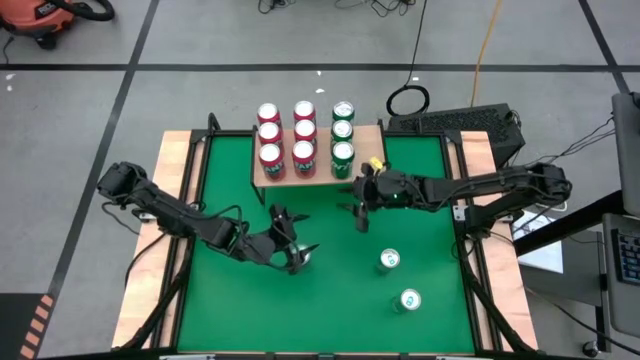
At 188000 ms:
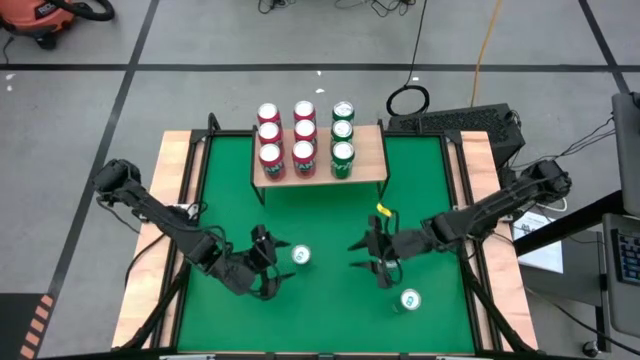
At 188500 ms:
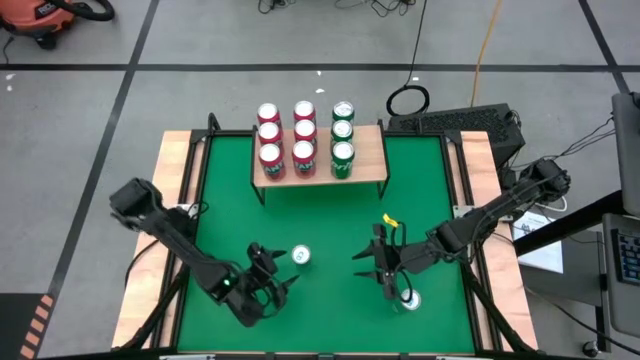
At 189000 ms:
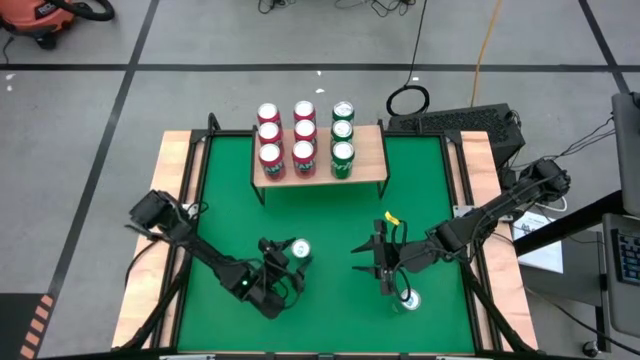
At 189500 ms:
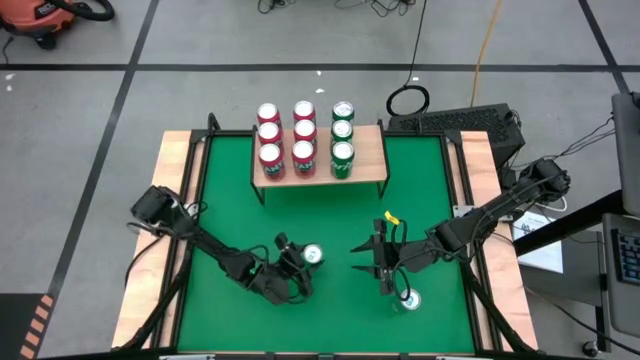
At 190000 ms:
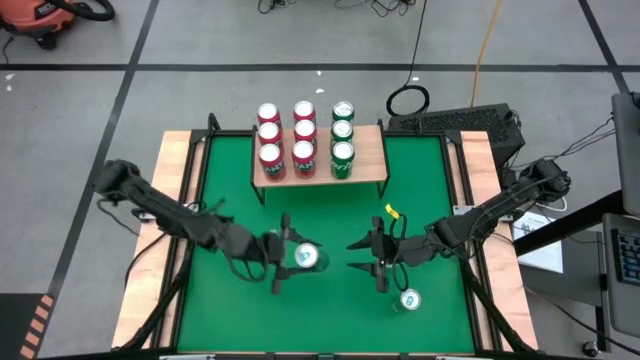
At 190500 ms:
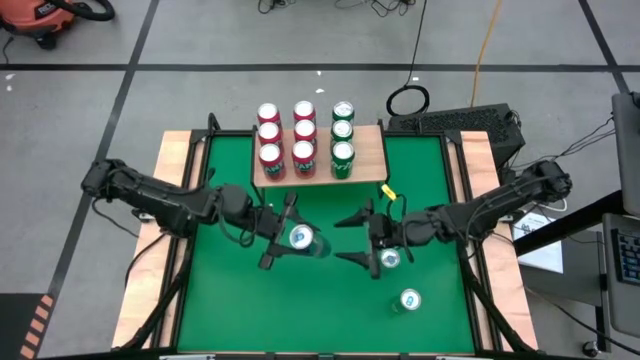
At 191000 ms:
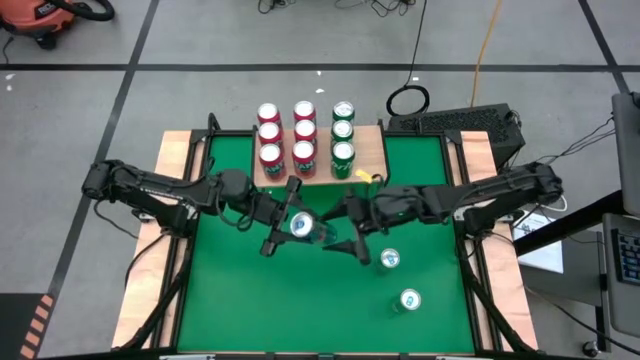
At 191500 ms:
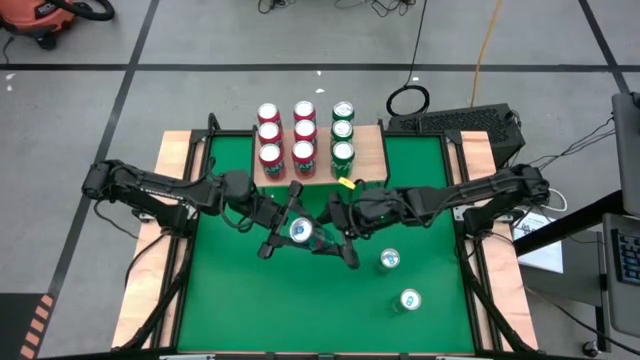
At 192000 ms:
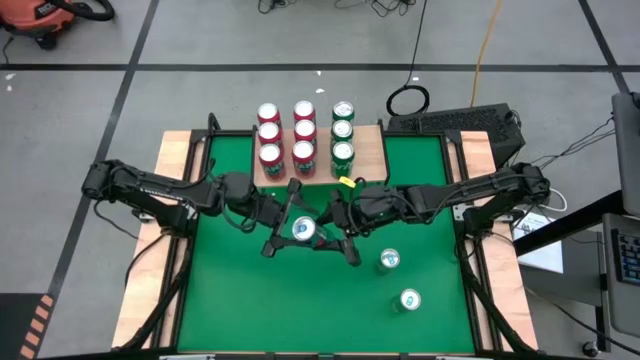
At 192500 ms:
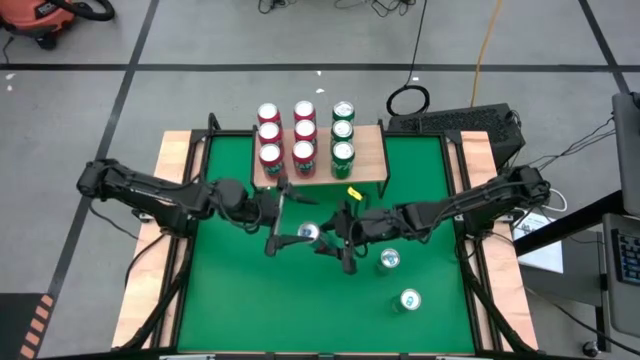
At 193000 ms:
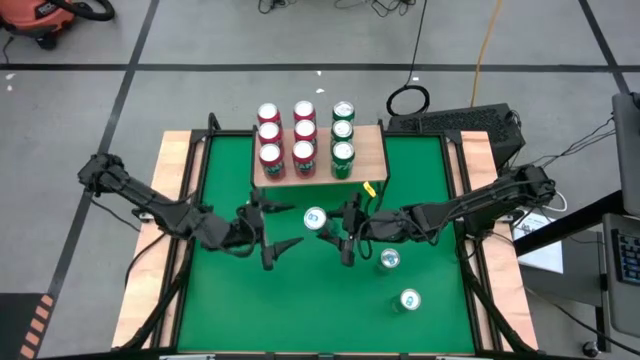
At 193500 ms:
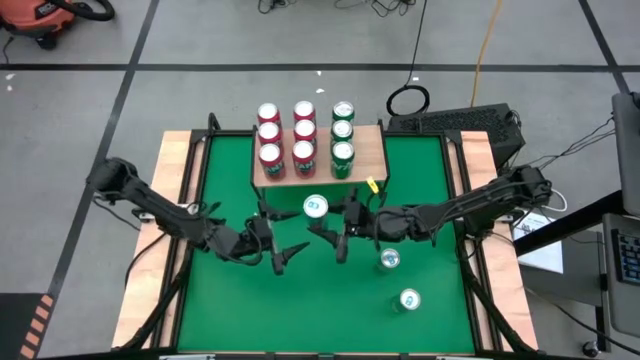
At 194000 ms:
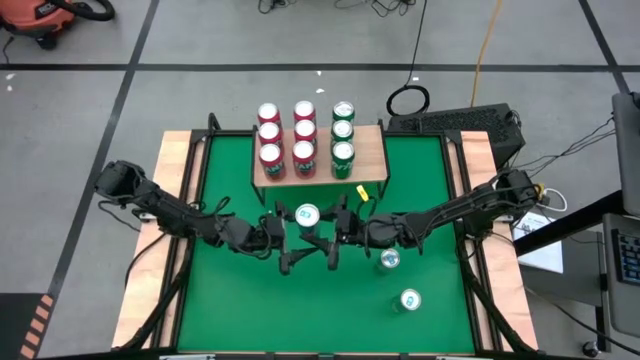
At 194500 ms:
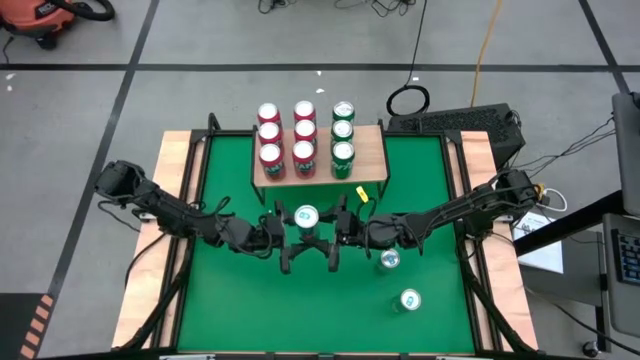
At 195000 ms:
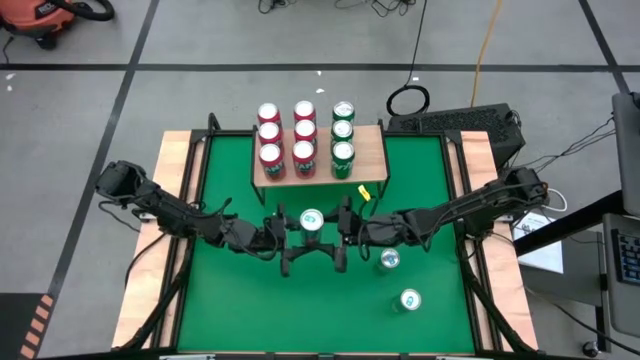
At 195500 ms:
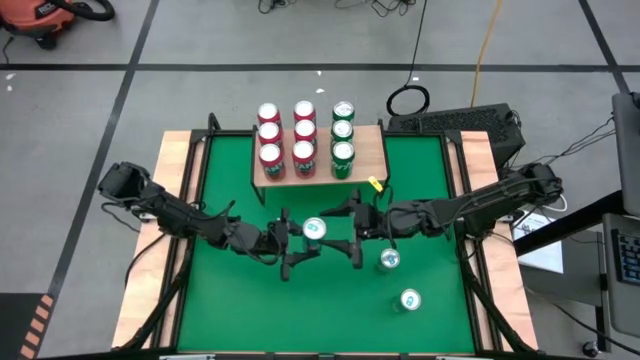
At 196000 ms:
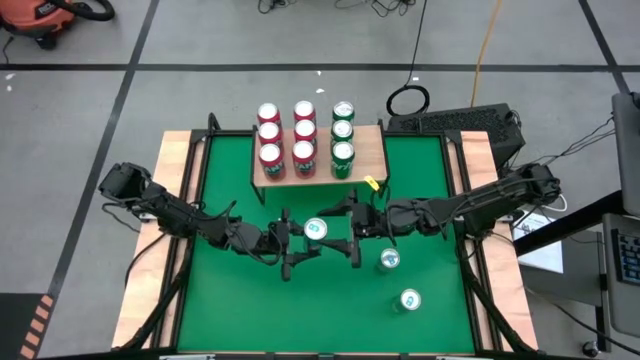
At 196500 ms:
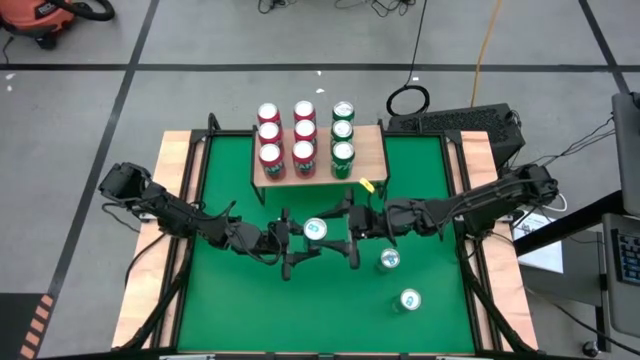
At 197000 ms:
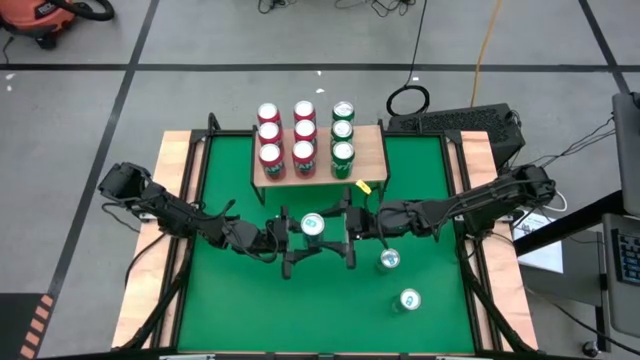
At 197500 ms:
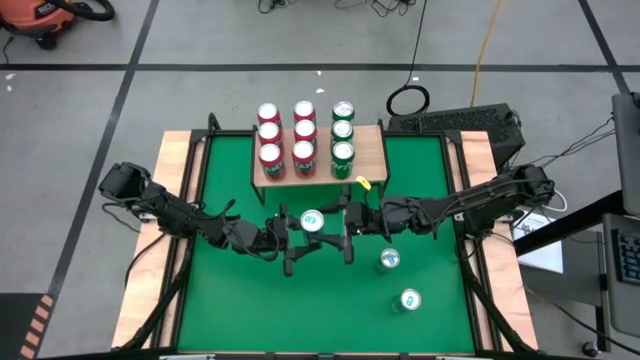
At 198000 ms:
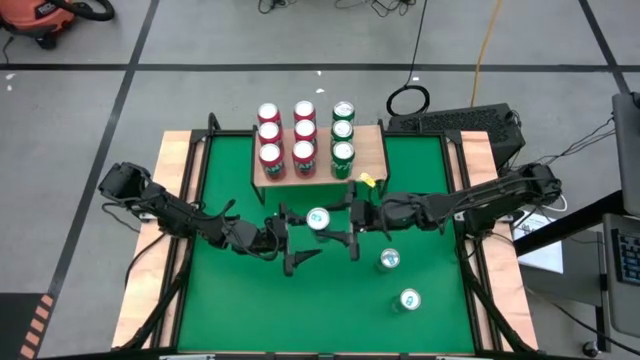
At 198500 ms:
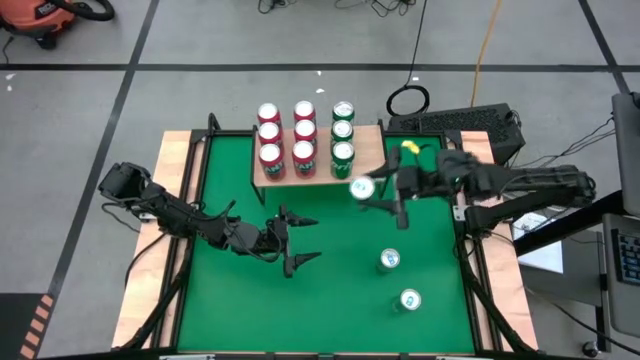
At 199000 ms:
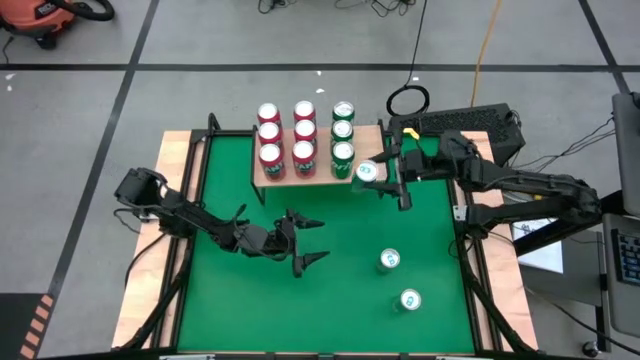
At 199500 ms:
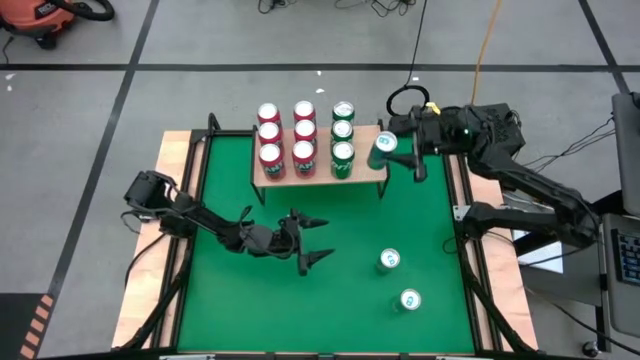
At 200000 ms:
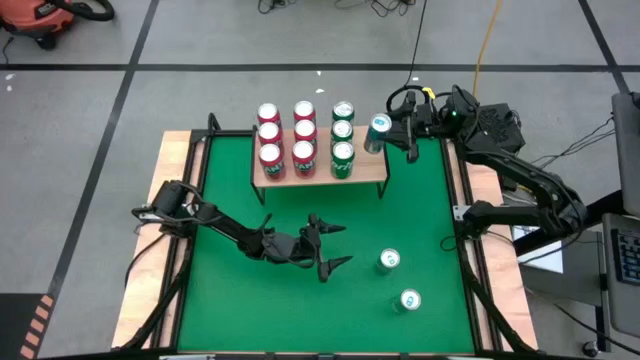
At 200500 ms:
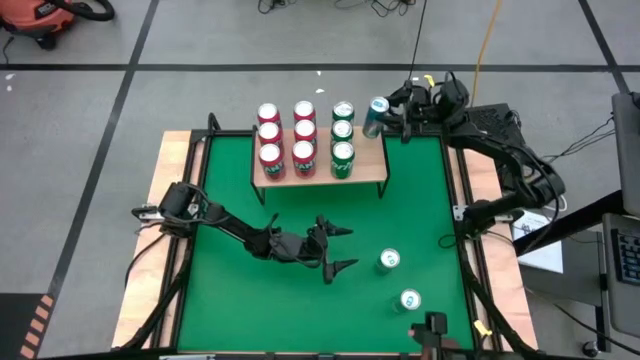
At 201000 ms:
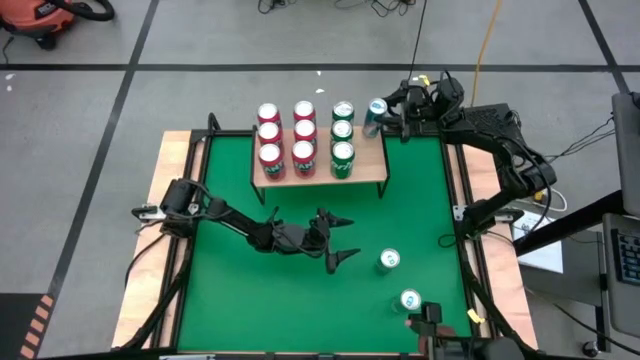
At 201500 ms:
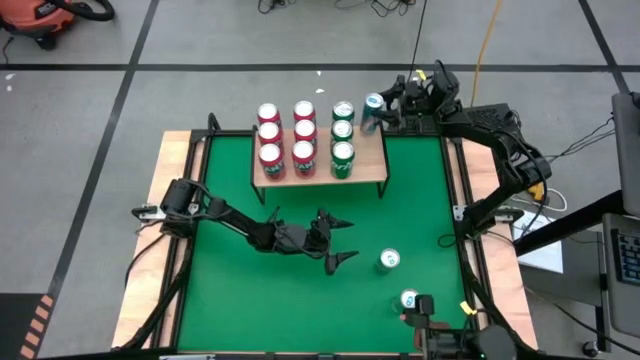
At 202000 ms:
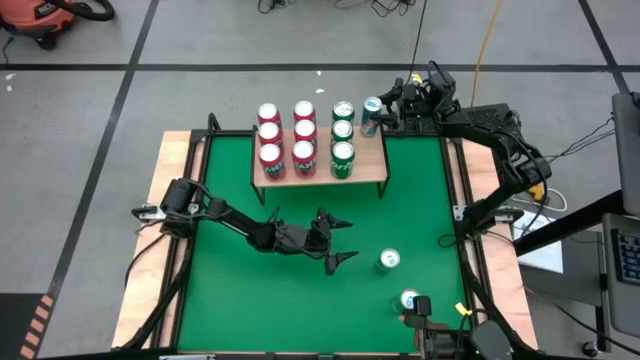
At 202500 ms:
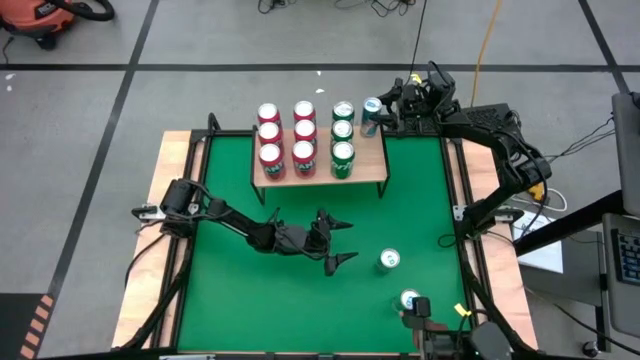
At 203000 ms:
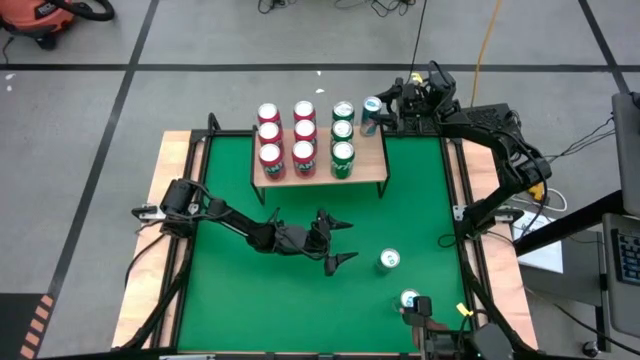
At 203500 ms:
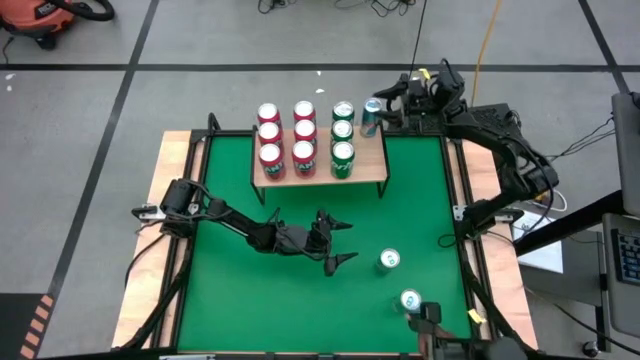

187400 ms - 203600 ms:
Task: Place canned beverage on shelf
Put the blue soda can on the shelf

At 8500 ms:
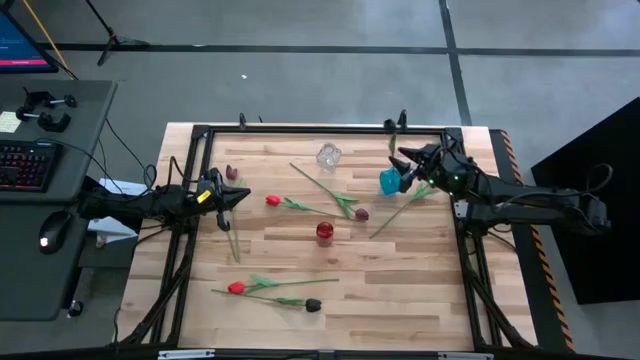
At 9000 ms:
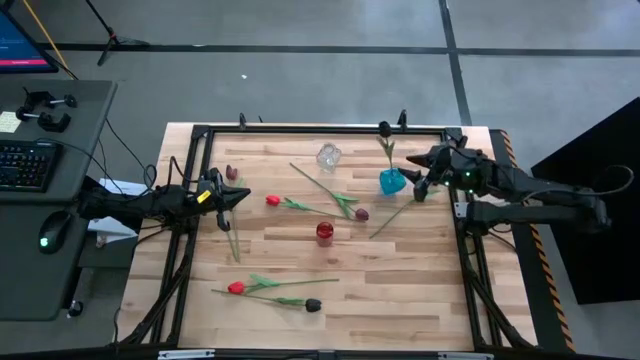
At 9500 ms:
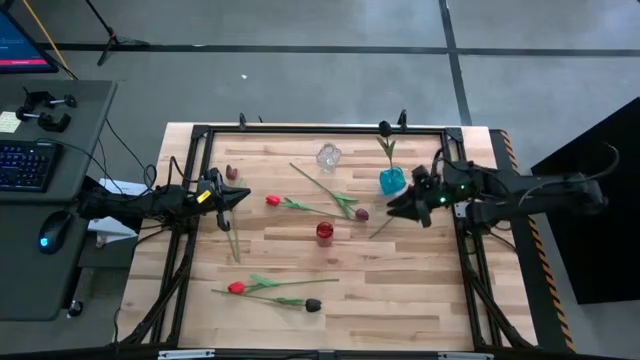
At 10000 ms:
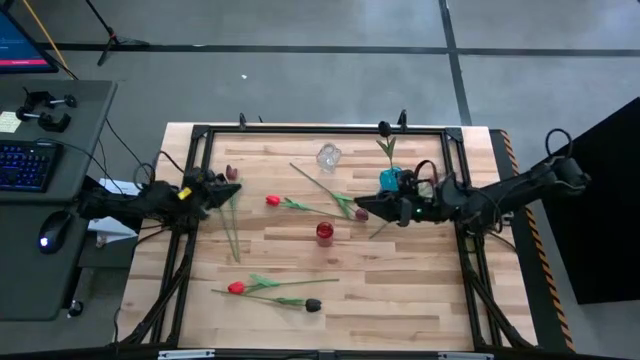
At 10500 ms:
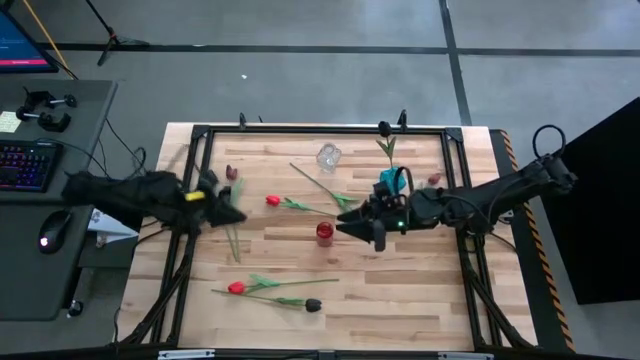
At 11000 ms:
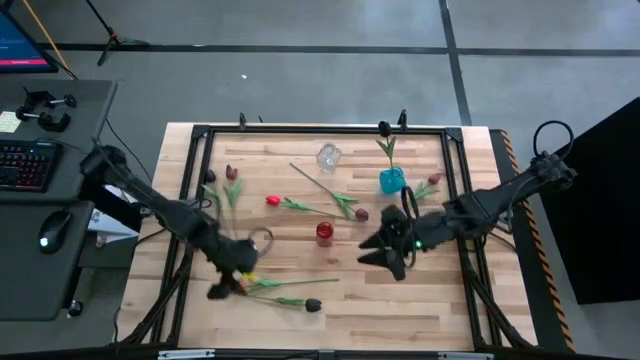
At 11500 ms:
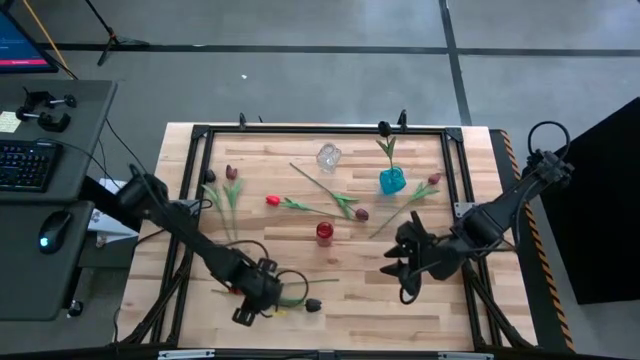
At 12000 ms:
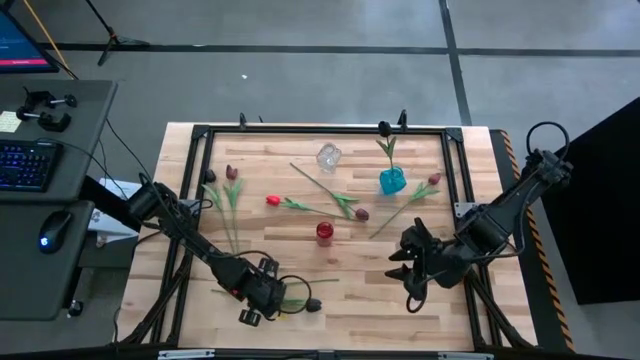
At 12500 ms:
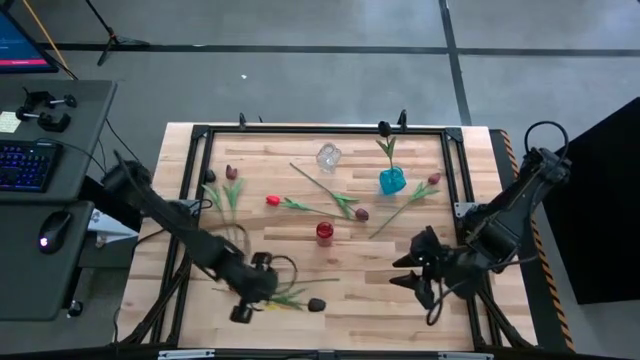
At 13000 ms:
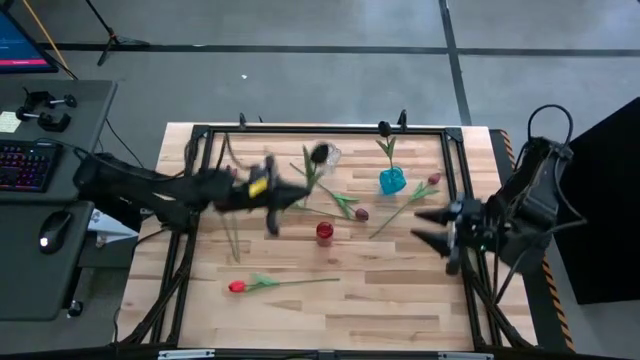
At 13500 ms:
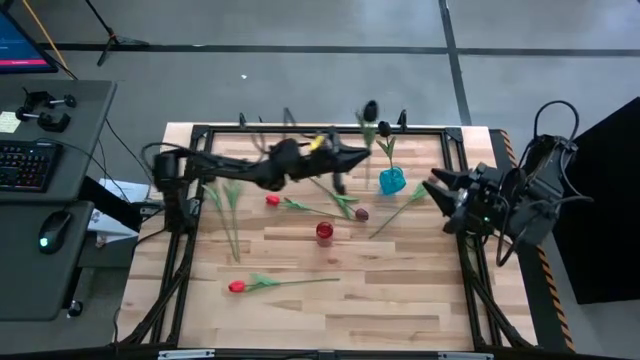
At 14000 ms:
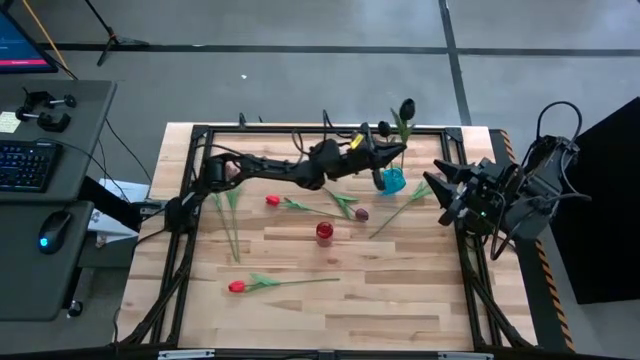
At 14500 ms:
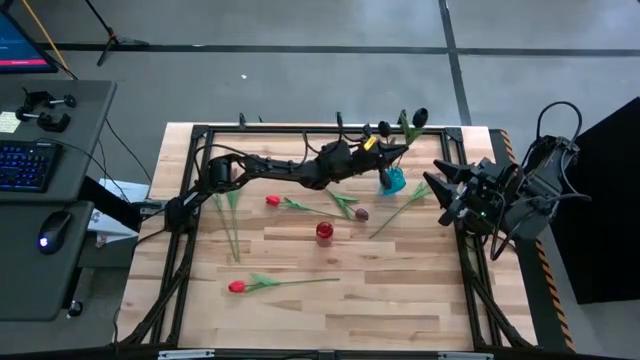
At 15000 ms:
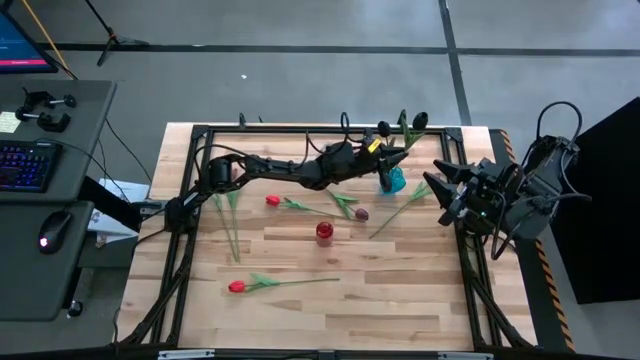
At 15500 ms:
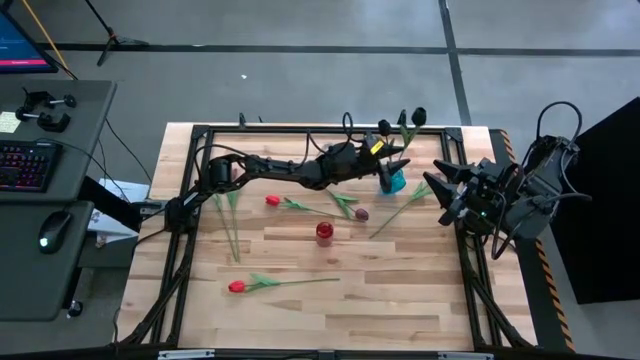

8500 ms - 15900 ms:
Task: Sort flowers into vase by color
Put the bottom black flower into the blue vase
